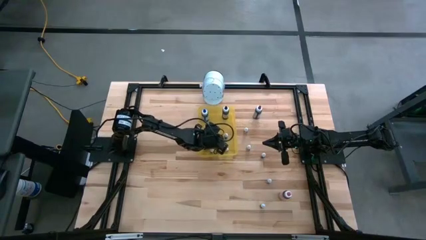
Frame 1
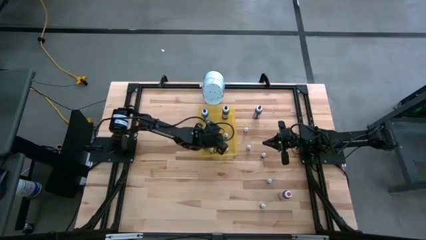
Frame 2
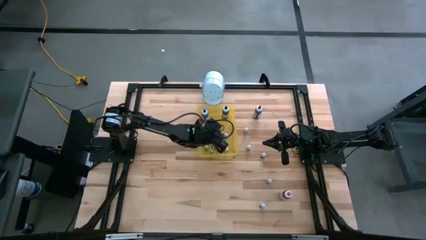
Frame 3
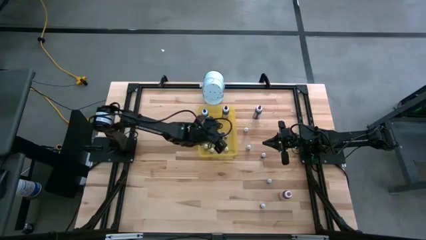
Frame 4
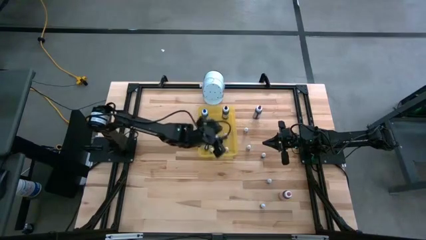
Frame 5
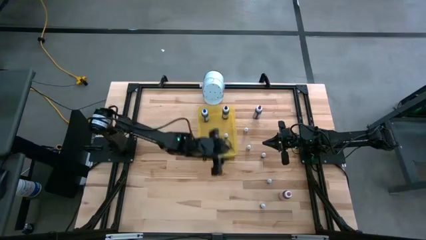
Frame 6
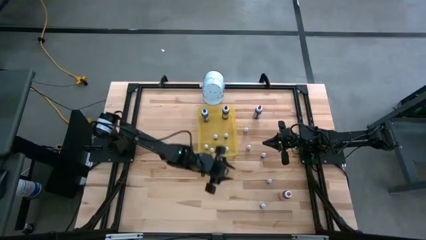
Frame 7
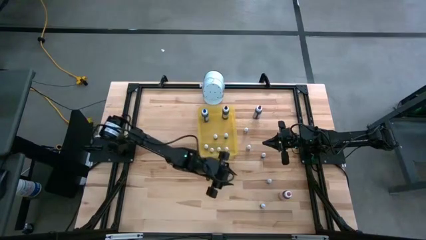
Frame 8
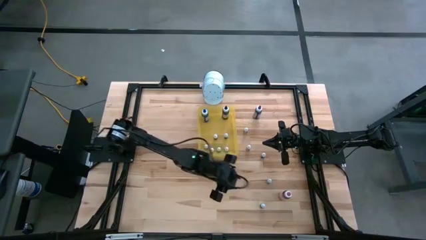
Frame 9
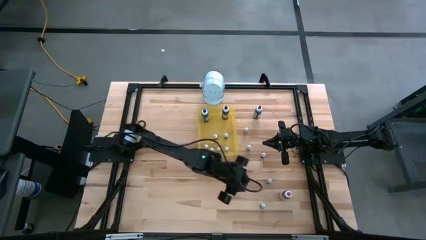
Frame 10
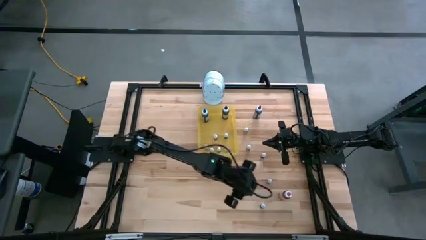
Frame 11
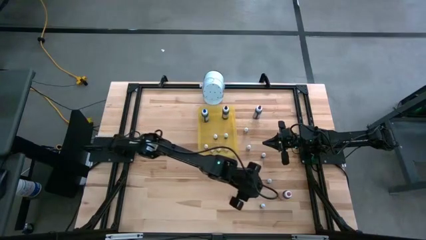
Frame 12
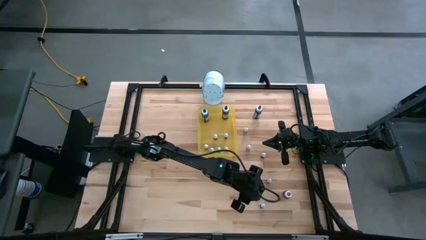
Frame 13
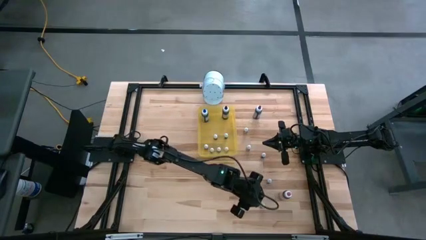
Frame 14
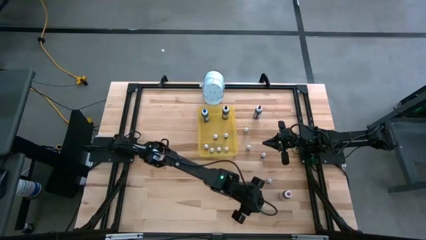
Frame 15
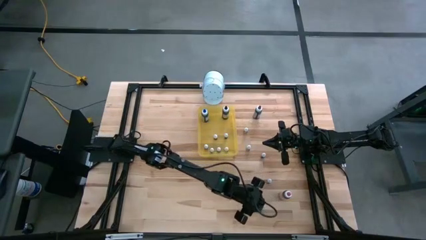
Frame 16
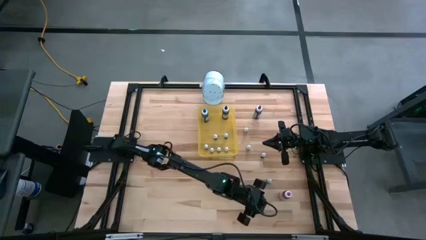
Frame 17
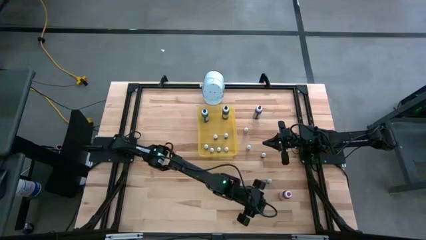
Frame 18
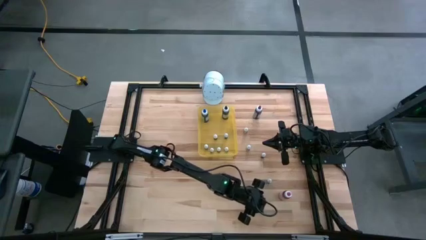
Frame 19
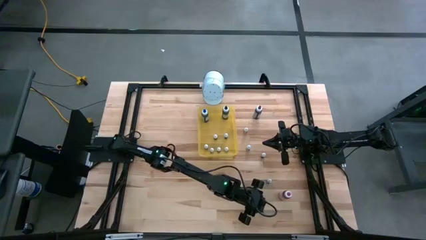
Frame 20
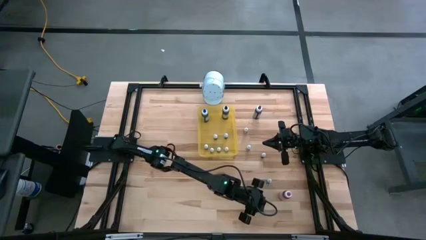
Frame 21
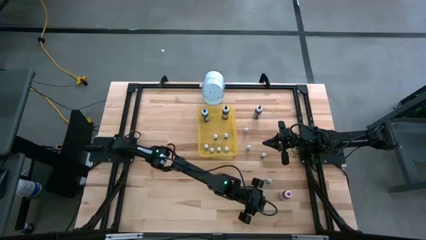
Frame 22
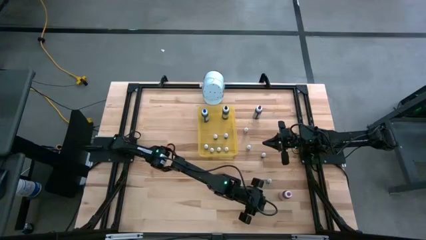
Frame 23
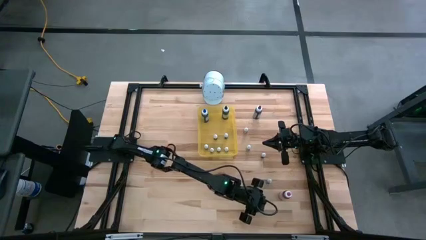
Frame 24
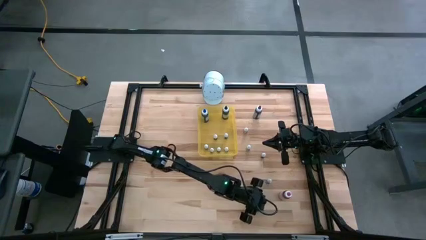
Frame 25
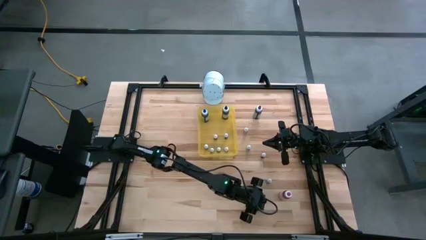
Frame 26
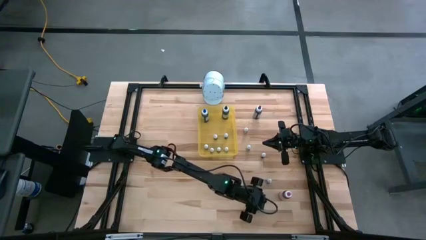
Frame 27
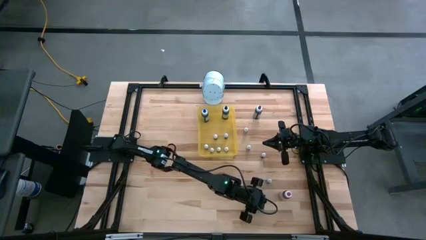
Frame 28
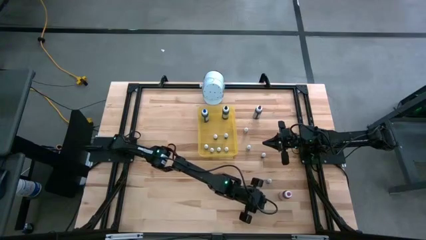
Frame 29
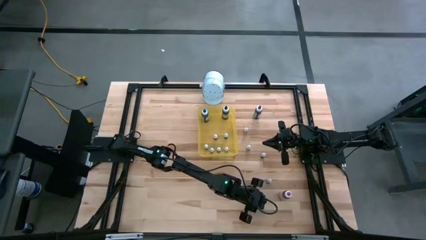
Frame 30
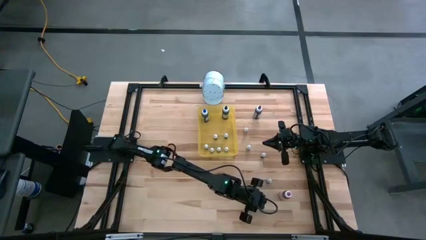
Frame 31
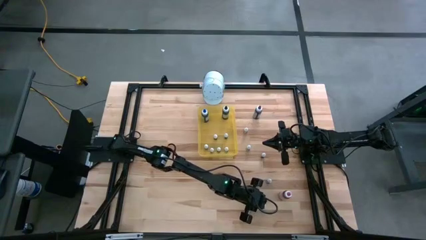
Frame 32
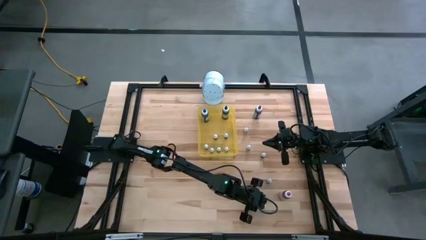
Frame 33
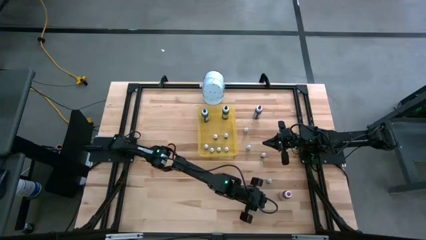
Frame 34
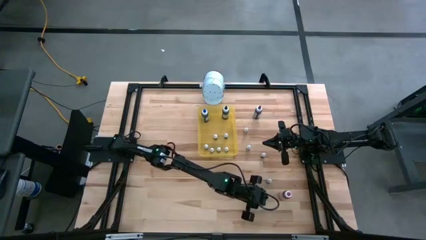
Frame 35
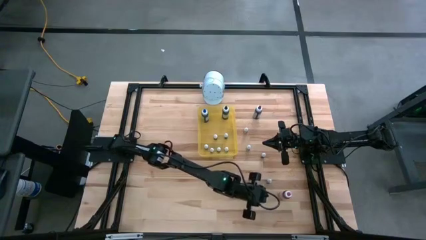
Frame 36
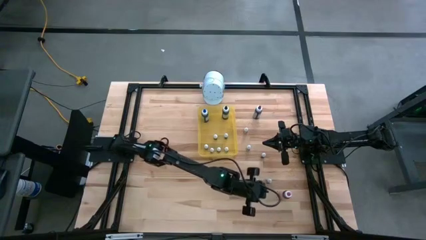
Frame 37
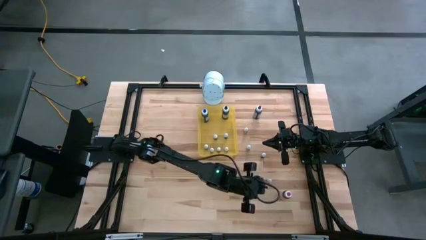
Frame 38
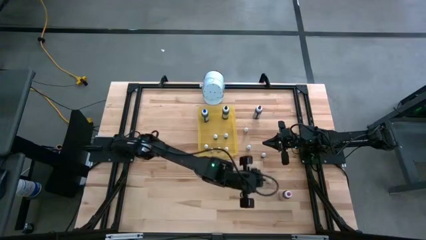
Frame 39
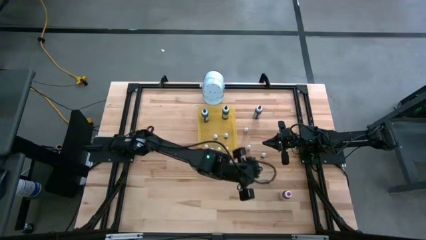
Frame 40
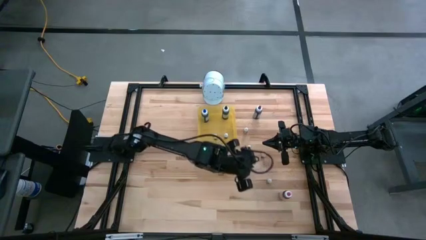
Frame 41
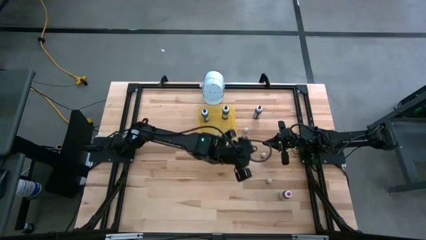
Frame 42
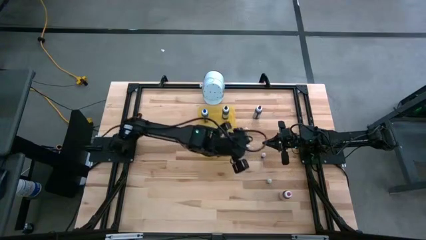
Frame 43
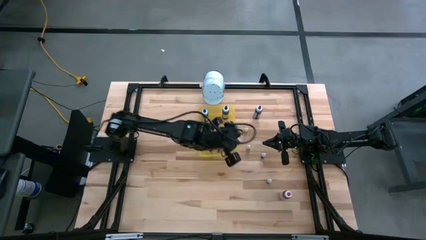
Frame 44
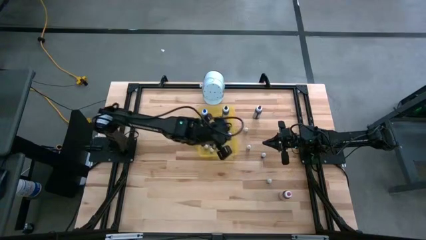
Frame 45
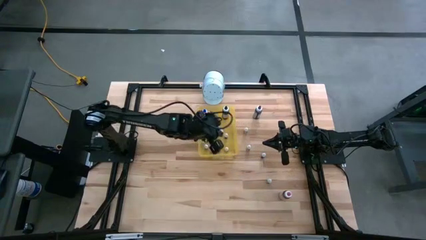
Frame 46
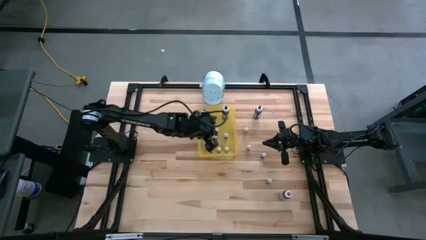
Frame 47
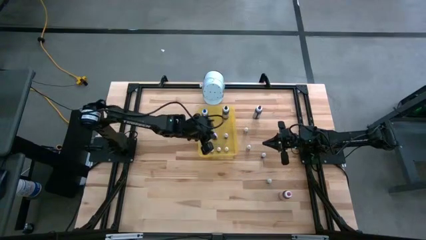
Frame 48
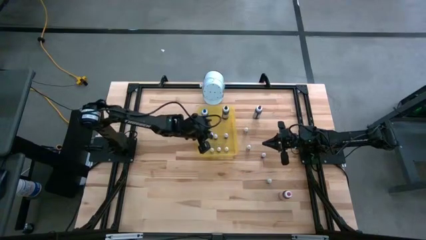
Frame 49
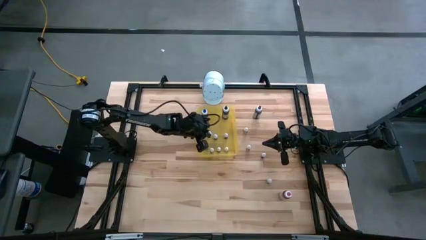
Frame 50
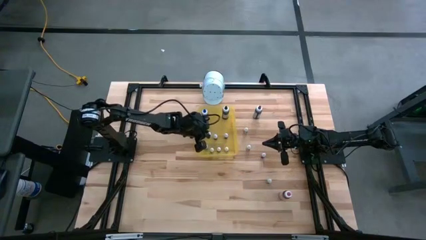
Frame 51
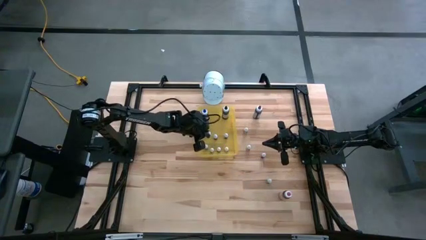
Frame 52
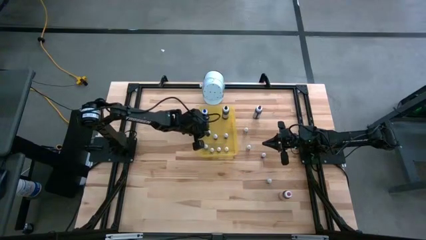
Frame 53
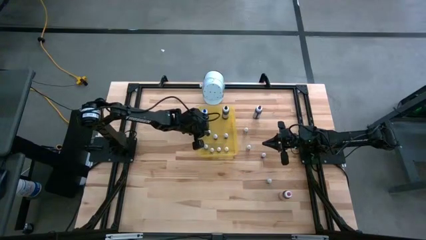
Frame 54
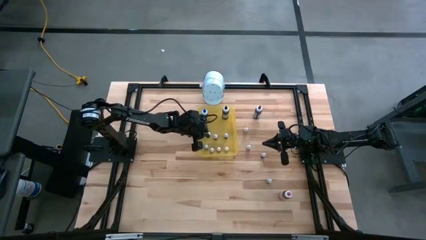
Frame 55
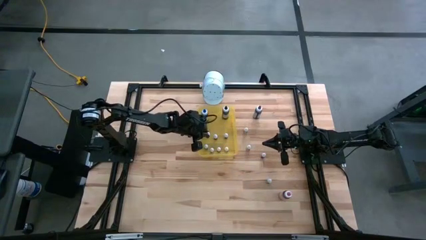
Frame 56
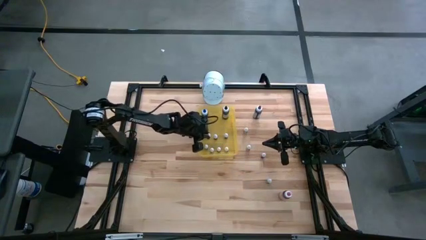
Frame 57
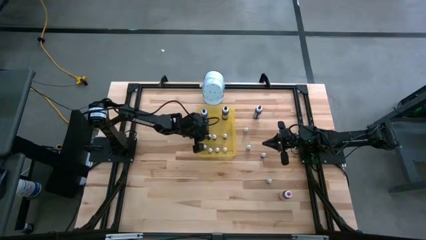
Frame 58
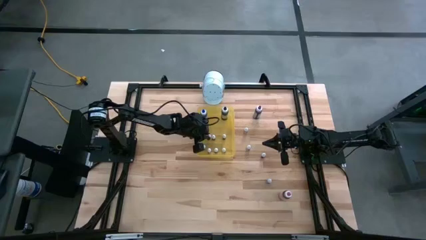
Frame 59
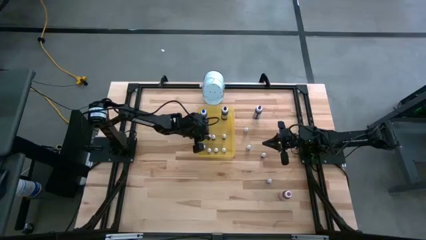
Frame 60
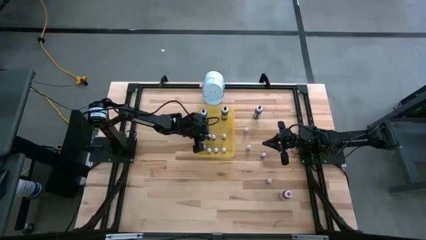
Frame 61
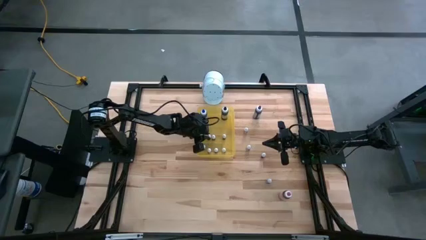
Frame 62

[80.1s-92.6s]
Task: Pick & Place food coloring
Put the small light blue food coloring bottle in the yellow transparent bin
